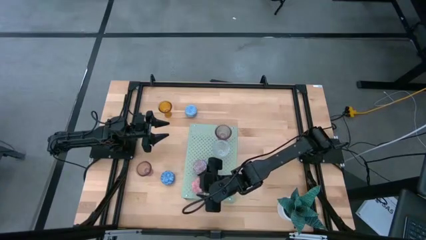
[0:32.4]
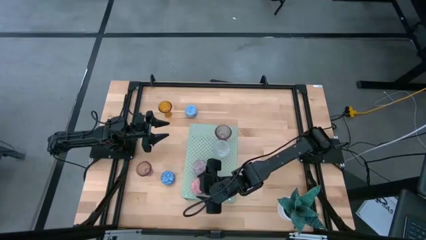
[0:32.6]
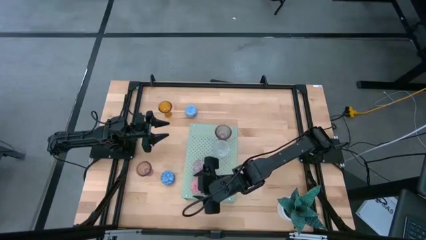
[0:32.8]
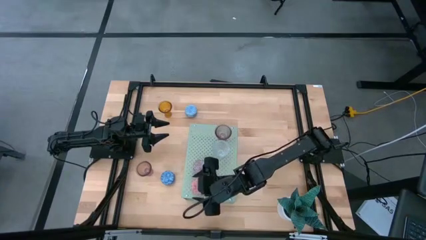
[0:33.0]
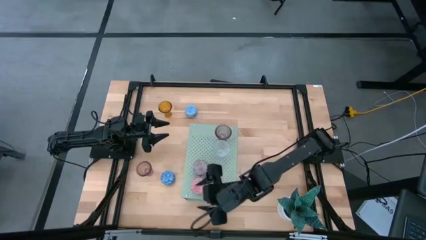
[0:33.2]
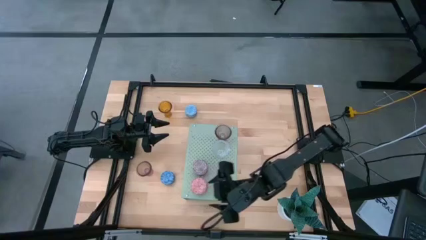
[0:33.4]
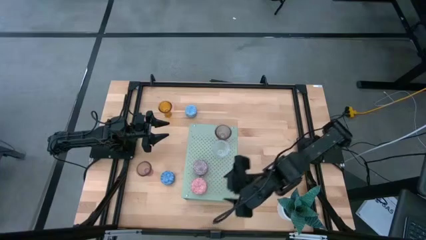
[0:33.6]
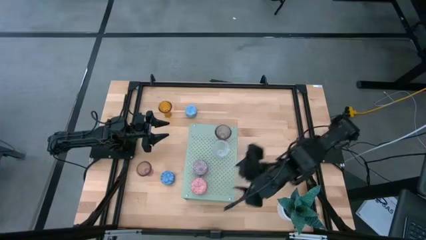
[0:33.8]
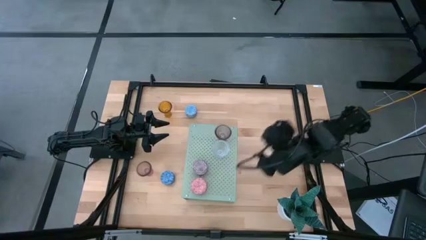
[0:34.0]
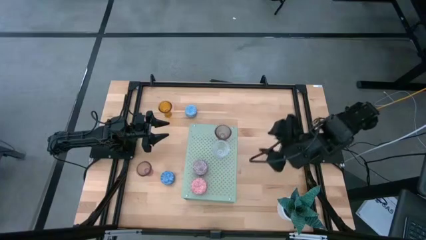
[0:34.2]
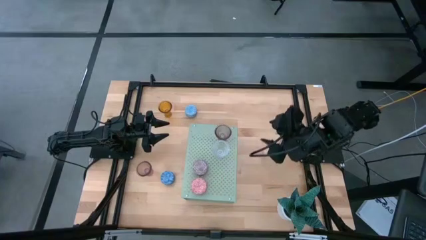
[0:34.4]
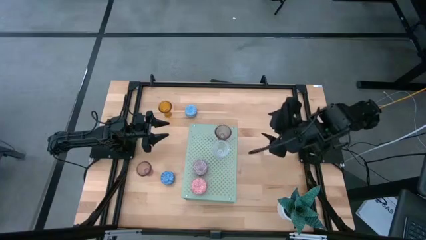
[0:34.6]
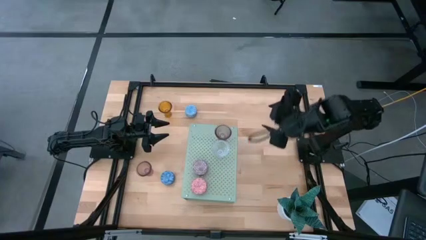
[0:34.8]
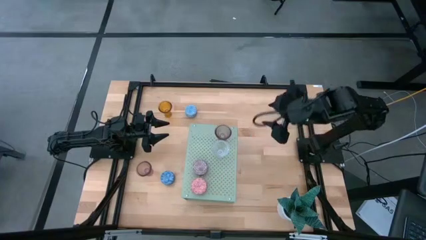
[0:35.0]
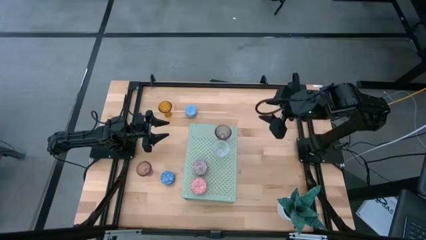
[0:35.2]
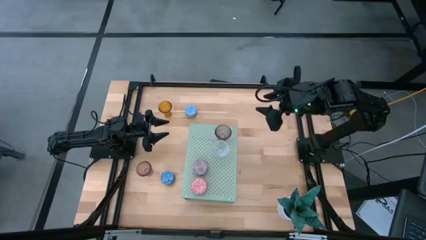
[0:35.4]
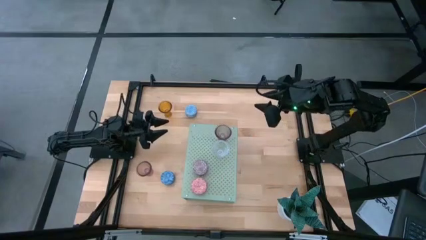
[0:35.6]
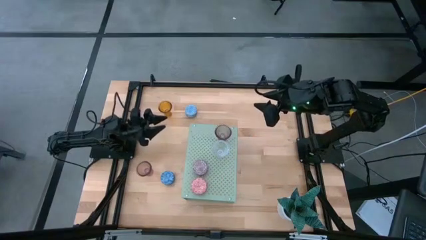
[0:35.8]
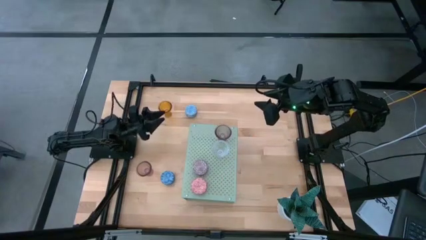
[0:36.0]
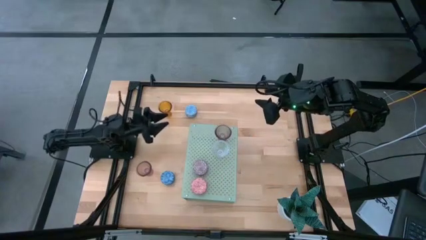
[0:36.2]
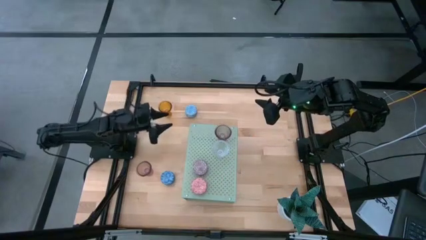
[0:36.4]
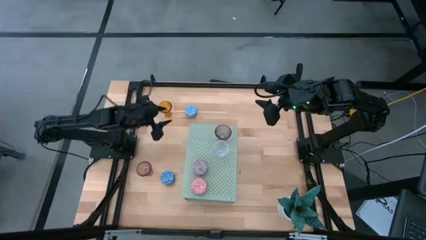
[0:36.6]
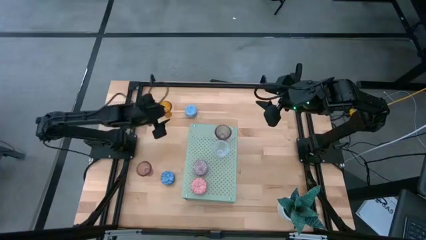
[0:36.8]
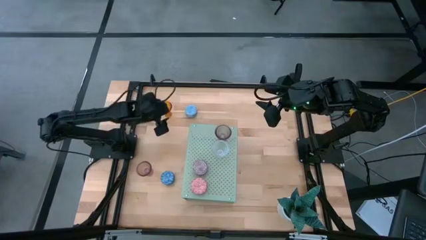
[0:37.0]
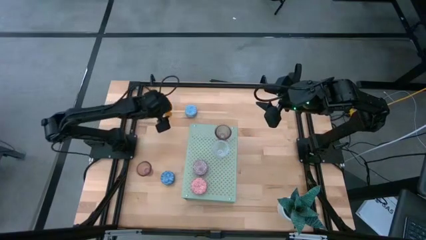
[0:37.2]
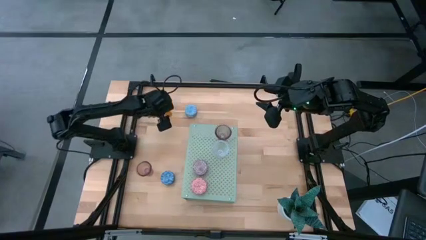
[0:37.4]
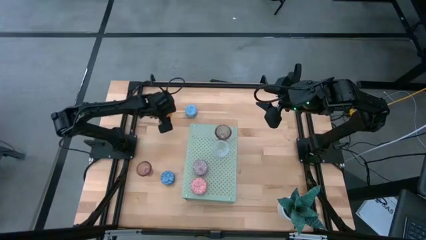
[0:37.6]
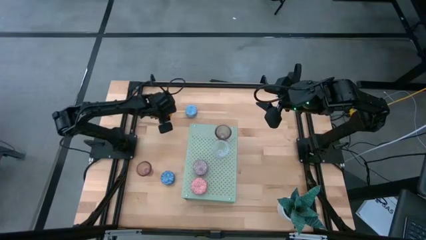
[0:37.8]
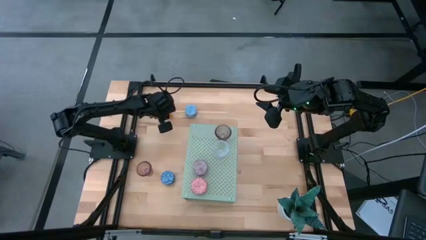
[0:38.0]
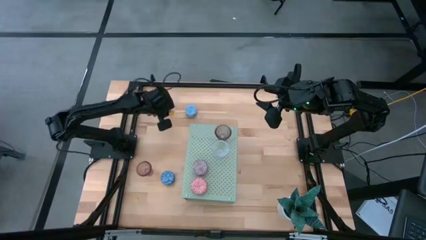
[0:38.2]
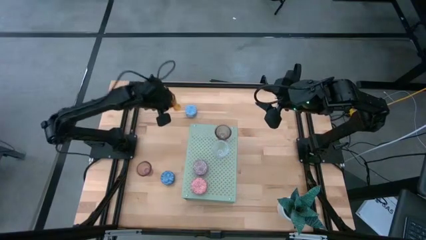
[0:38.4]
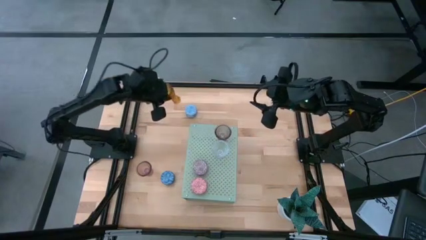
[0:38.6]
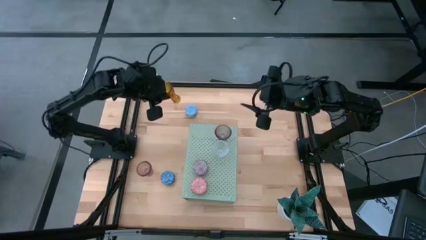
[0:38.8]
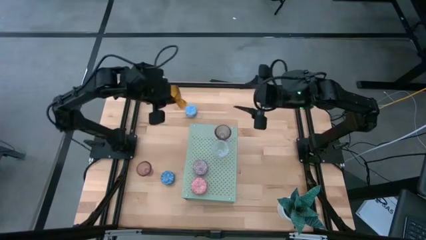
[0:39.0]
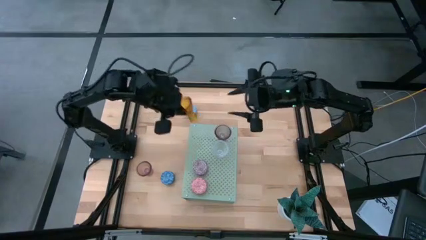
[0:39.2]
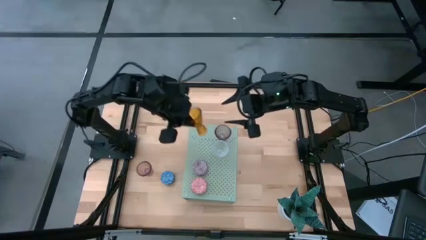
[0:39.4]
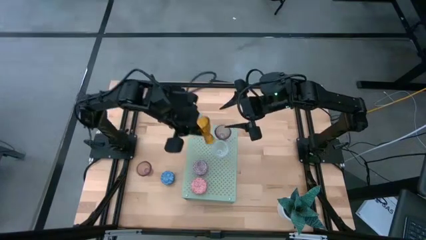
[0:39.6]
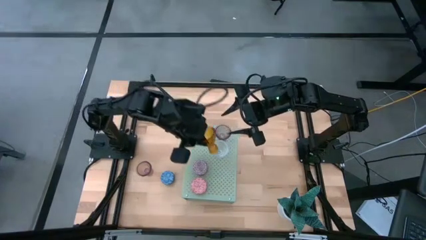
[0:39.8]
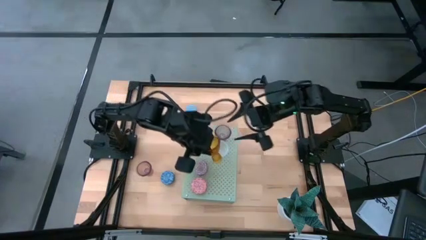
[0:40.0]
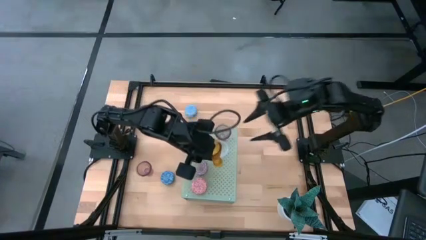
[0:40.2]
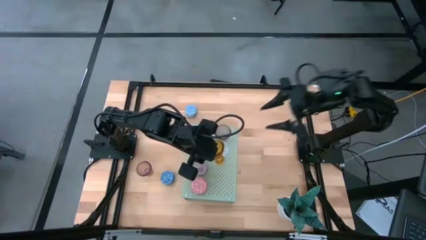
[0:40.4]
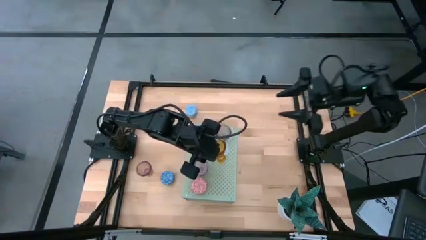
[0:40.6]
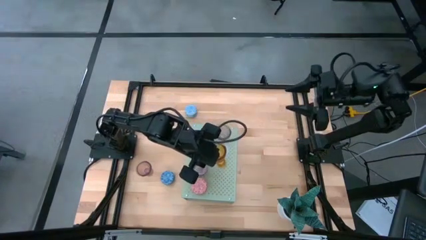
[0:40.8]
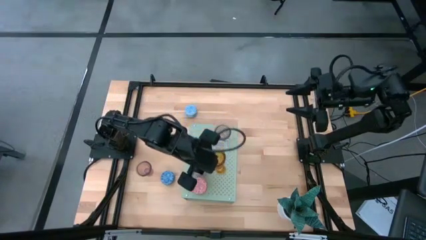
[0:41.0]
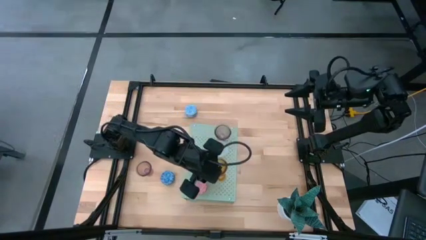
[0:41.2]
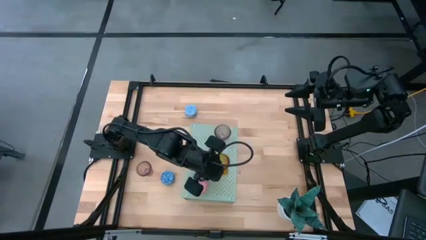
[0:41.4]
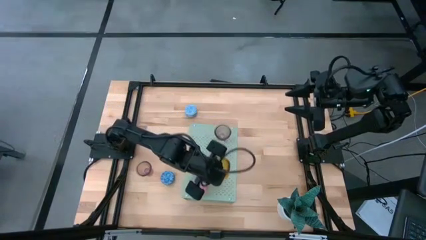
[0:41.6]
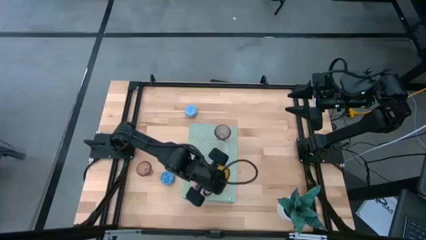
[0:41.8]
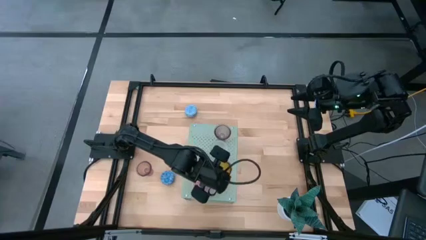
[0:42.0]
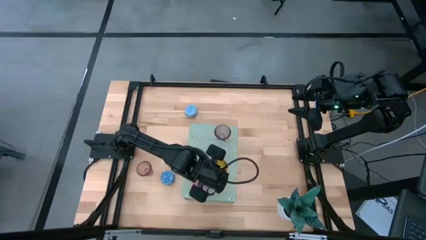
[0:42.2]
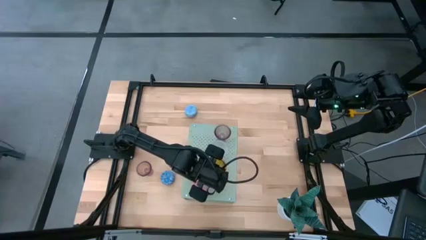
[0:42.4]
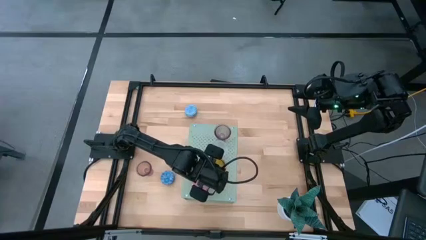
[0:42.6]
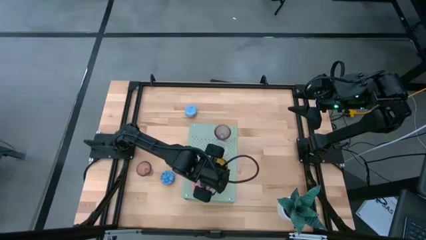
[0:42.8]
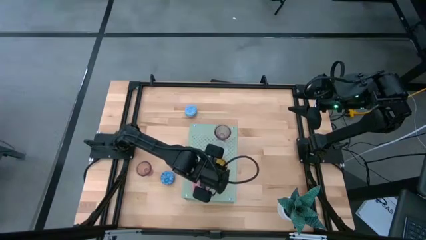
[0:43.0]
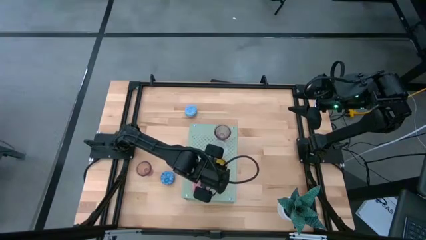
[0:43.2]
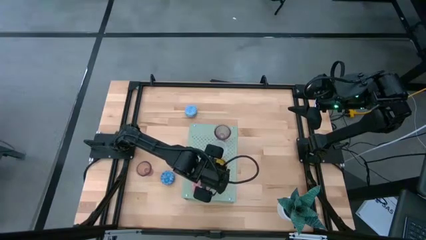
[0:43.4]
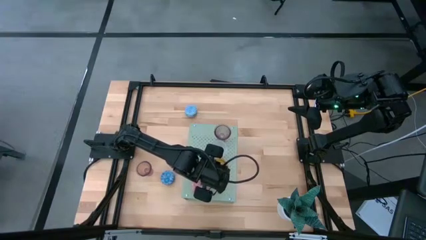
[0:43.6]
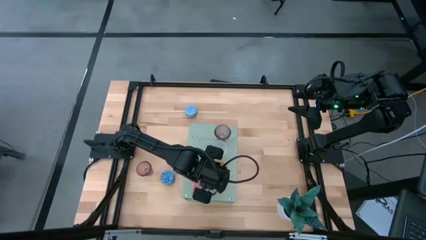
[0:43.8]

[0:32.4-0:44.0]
Task: Pick & Place candle stick holders
Put the yellow candle holder on the shelf

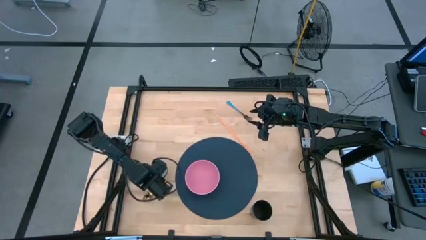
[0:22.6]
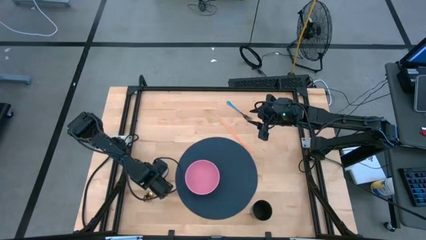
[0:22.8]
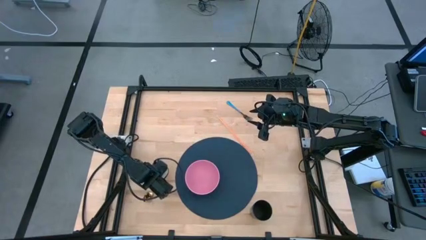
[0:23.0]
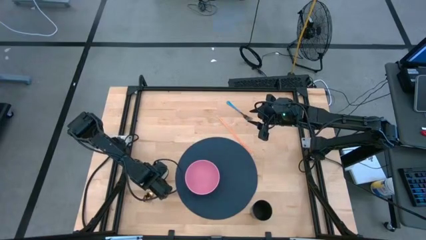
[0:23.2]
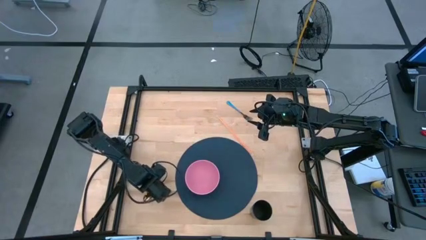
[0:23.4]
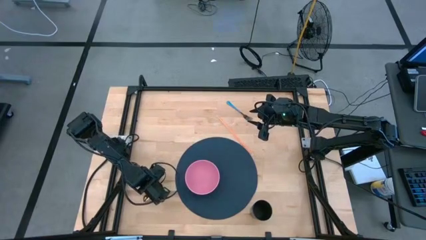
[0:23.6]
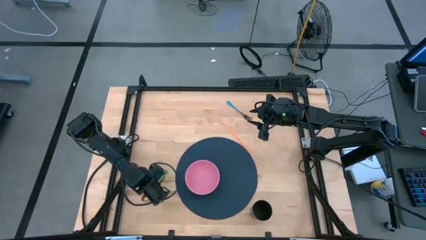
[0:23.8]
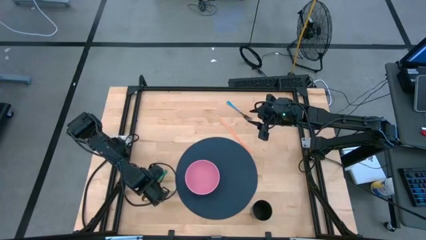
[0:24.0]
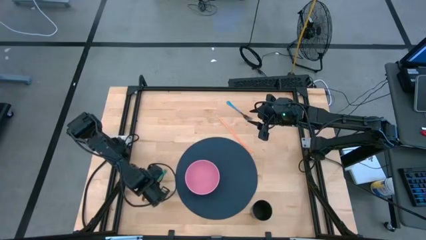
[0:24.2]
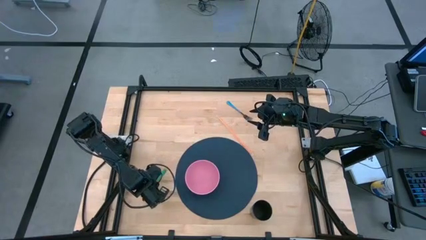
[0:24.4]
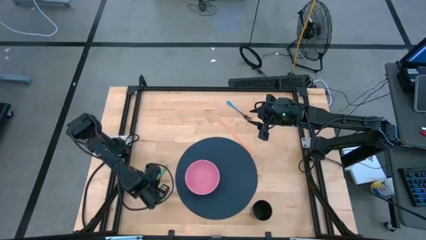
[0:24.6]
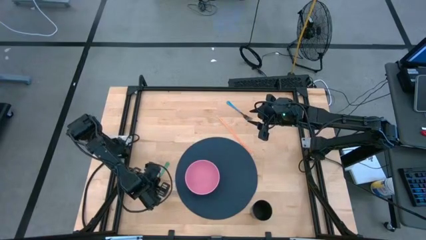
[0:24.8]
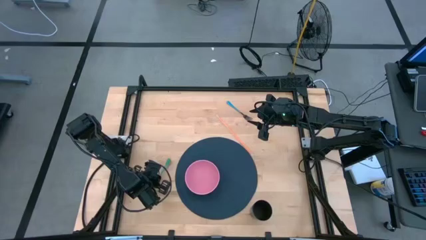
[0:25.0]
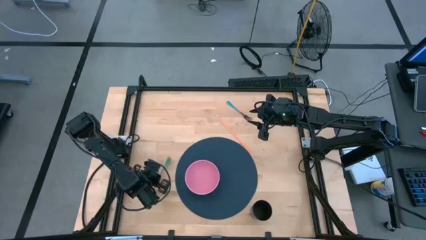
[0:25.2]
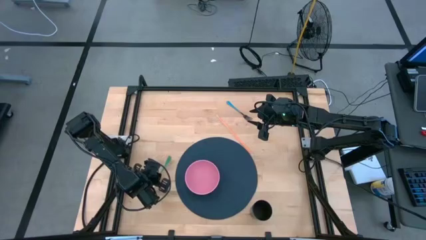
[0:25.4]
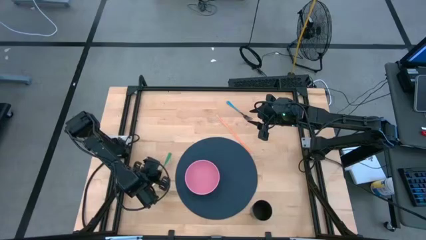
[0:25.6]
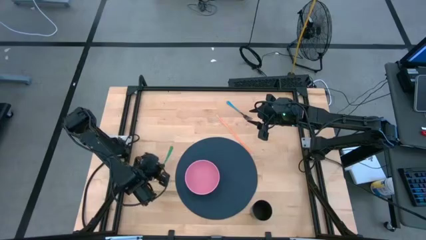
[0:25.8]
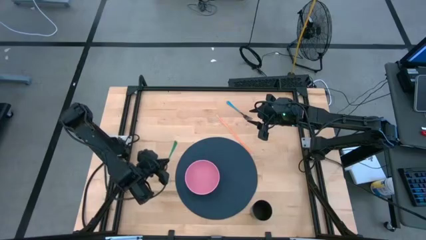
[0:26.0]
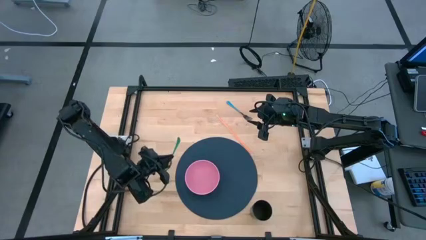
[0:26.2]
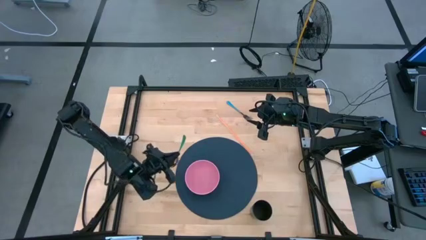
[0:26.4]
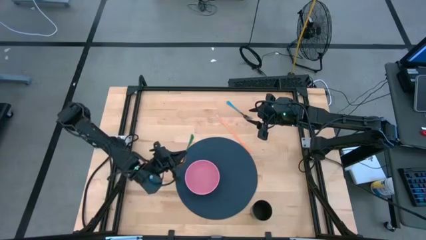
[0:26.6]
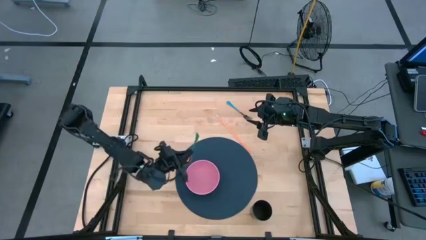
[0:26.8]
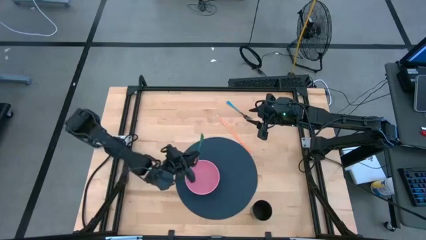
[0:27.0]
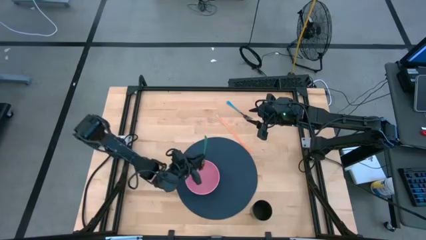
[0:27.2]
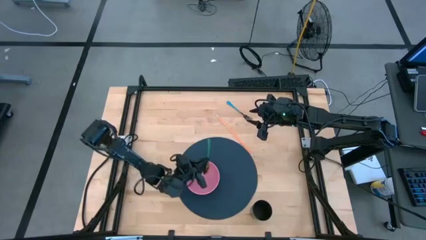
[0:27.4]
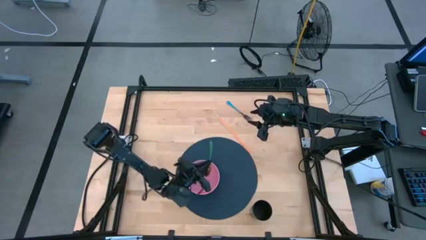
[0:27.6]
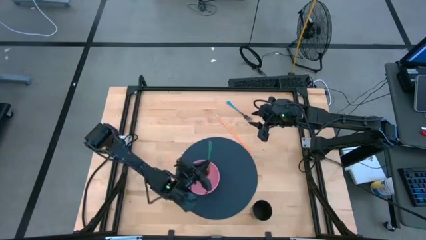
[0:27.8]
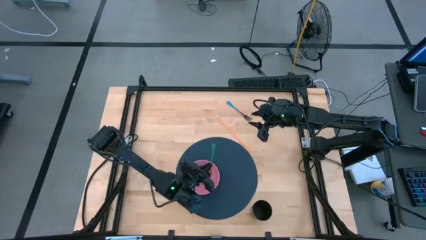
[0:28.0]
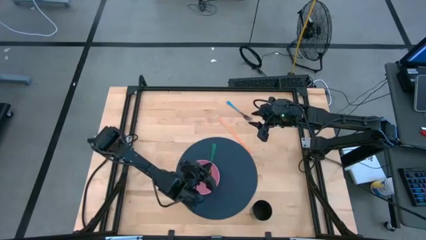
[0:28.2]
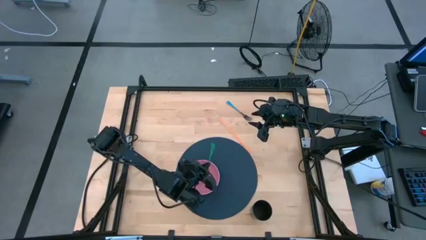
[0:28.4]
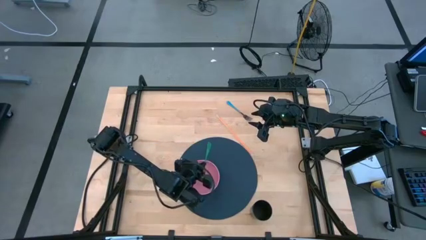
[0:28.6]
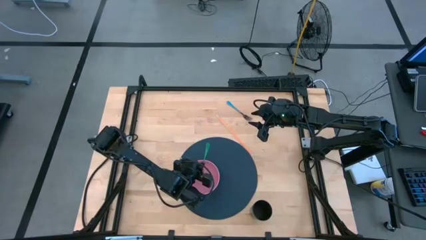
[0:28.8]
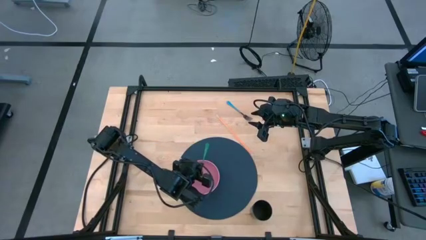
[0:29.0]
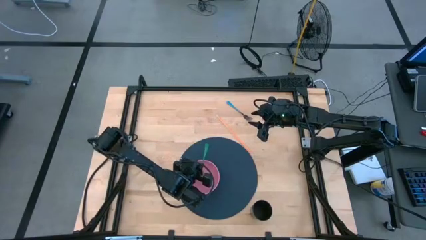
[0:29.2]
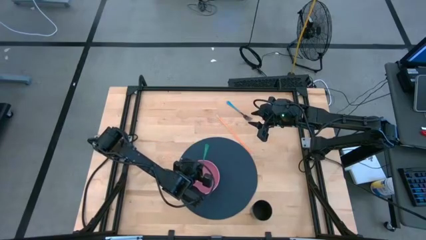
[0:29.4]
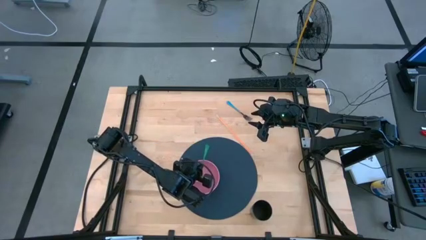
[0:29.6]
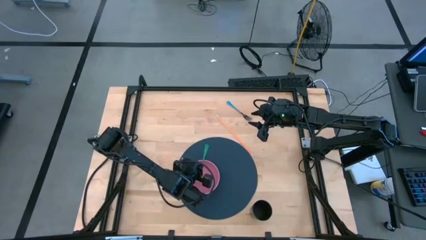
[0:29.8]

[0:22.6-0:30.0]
Task: Pick & Place Utensil
Put the green spoon into the pink bowl on the blue mat
